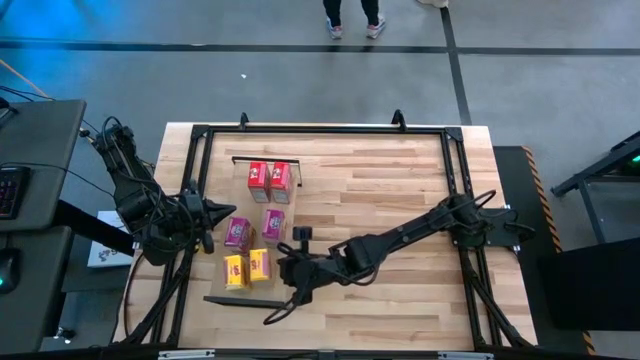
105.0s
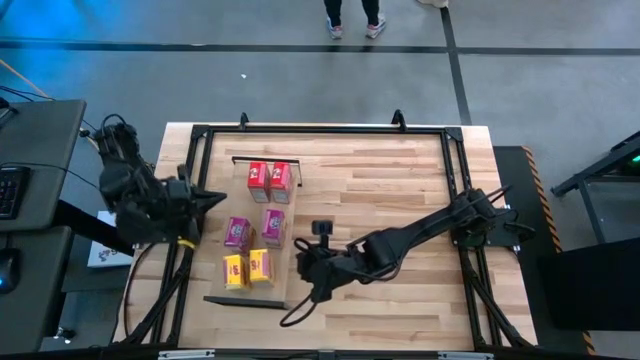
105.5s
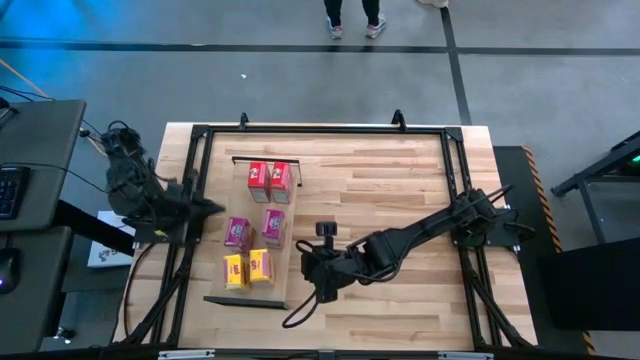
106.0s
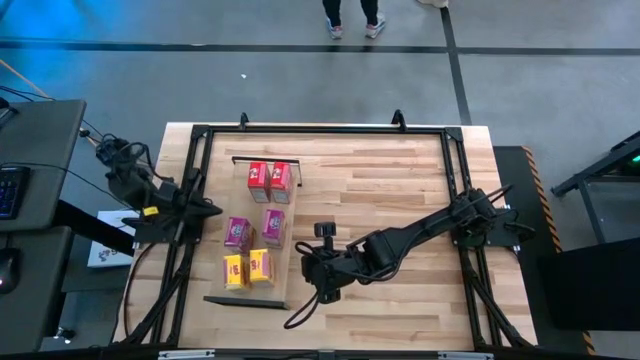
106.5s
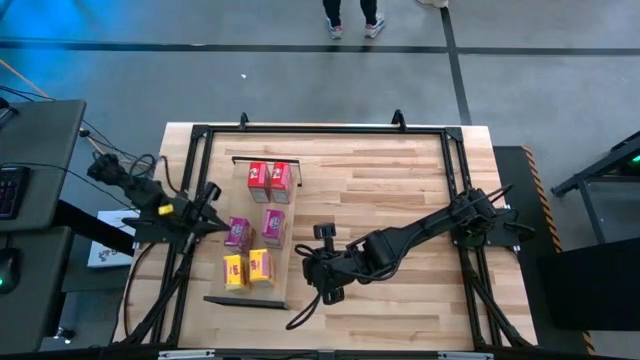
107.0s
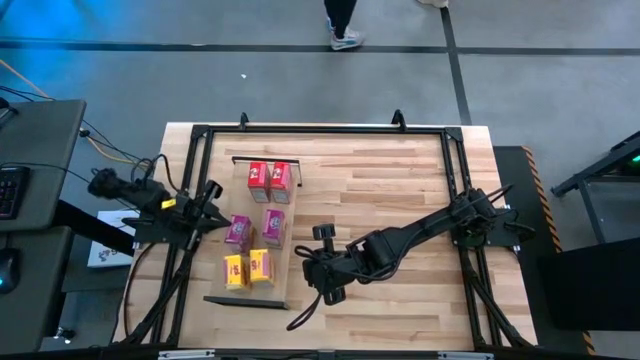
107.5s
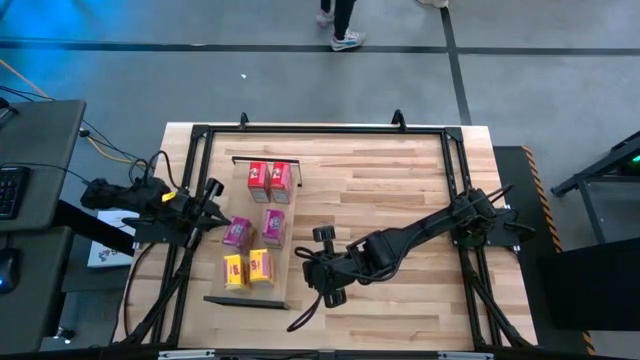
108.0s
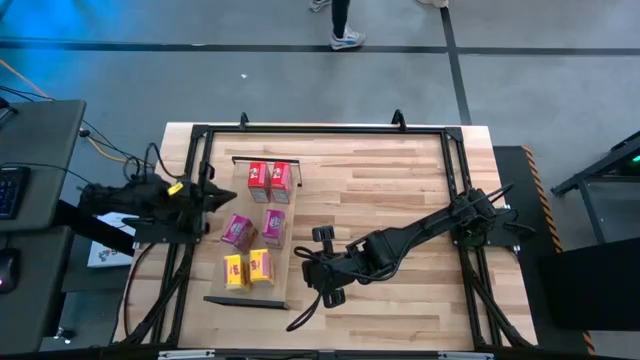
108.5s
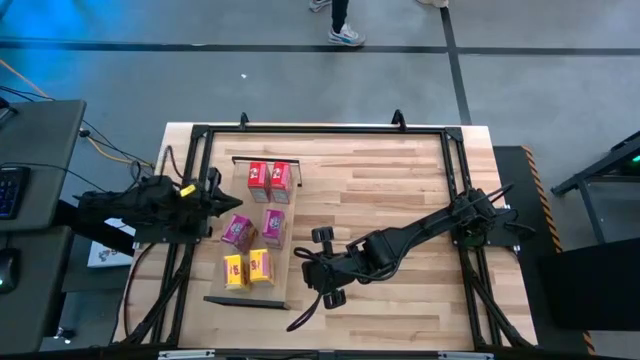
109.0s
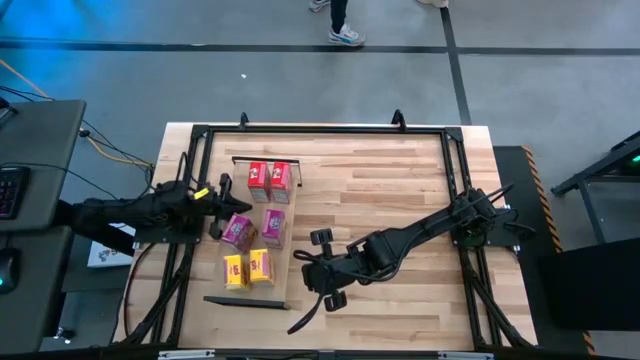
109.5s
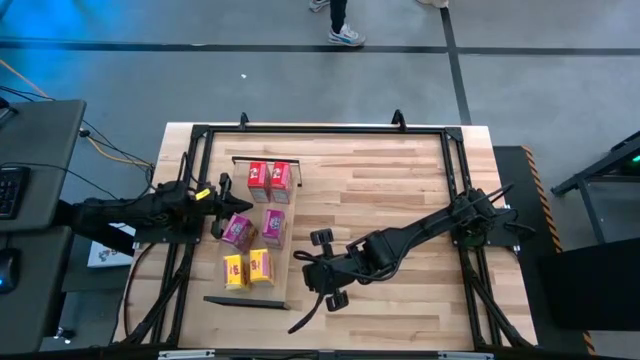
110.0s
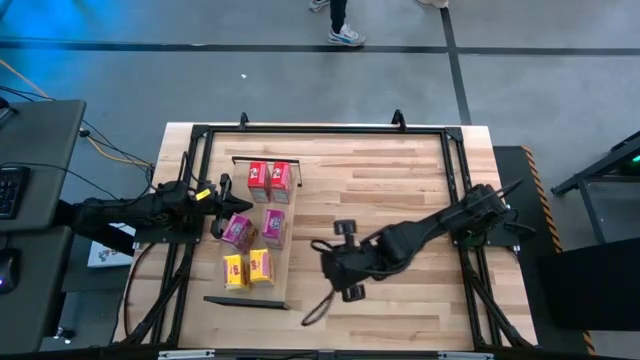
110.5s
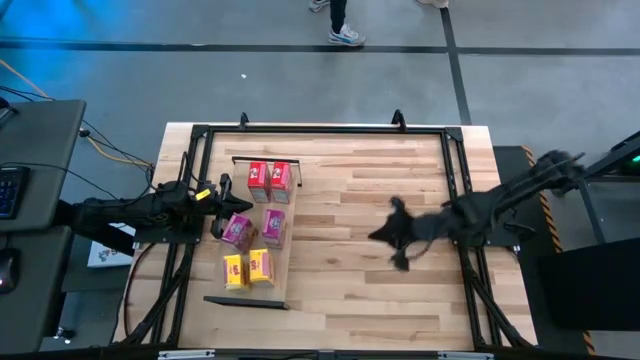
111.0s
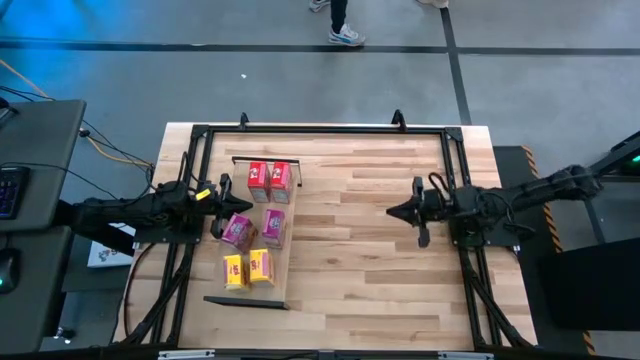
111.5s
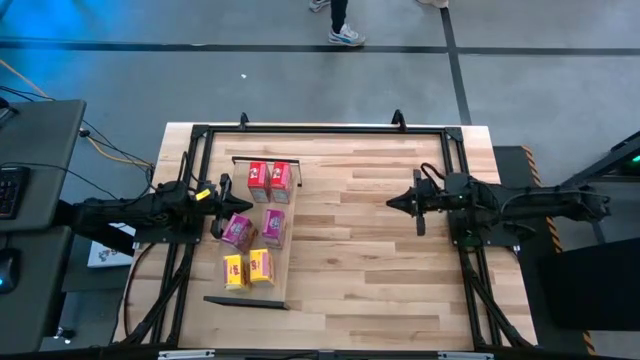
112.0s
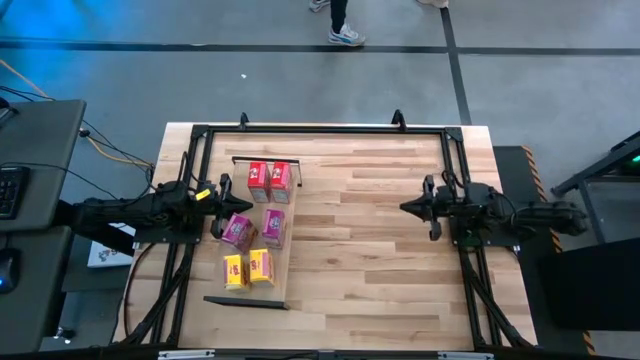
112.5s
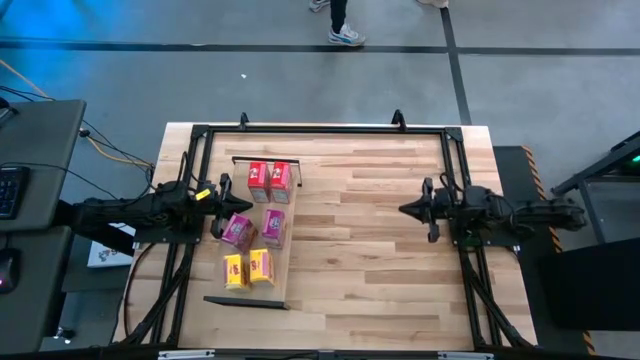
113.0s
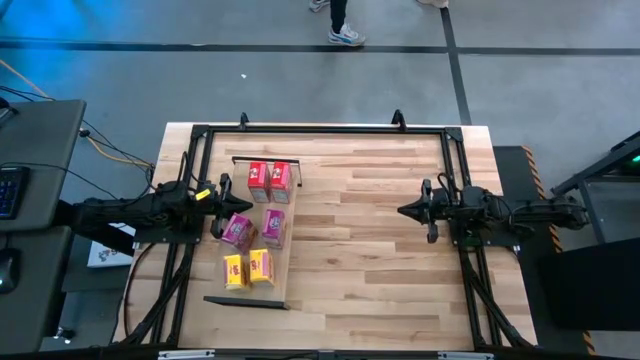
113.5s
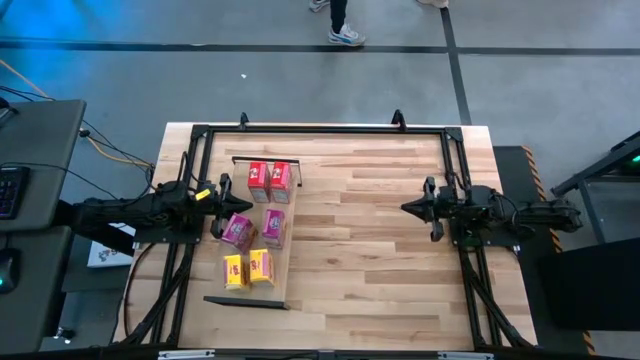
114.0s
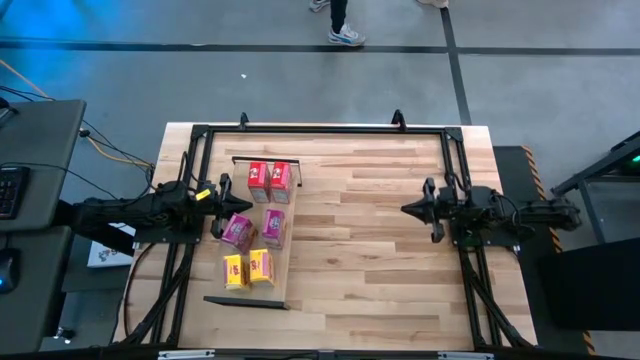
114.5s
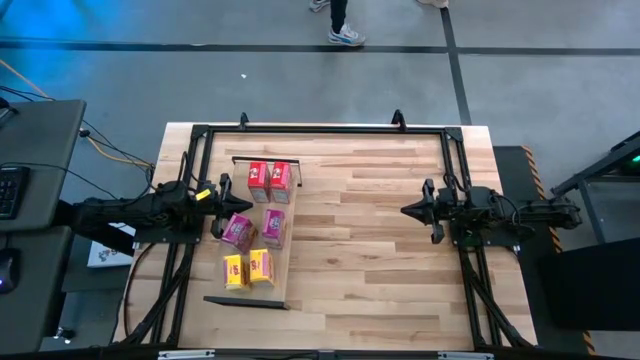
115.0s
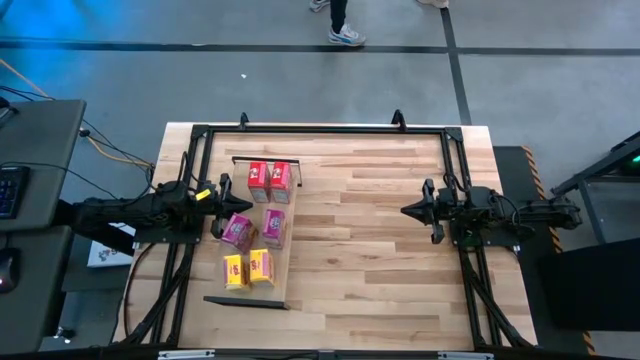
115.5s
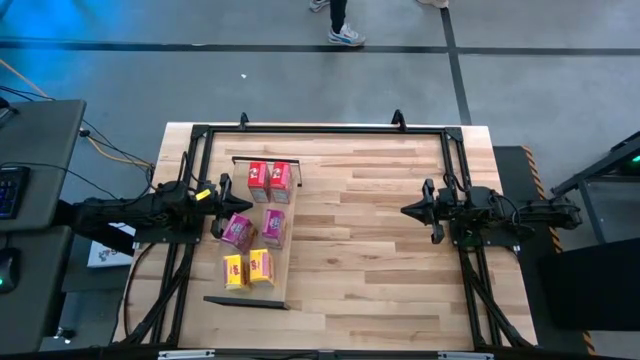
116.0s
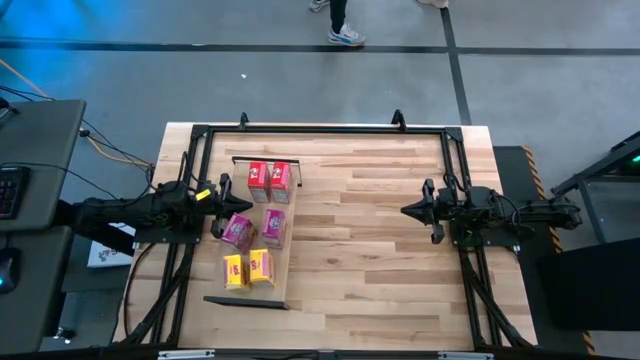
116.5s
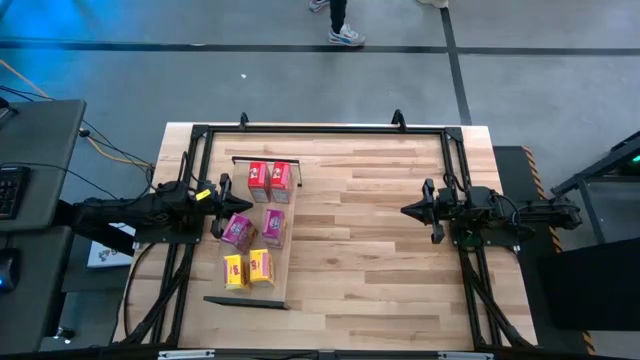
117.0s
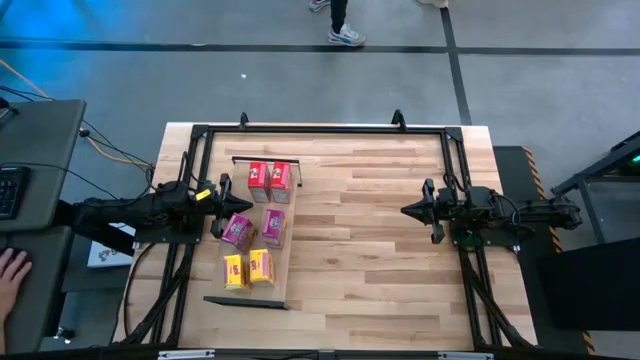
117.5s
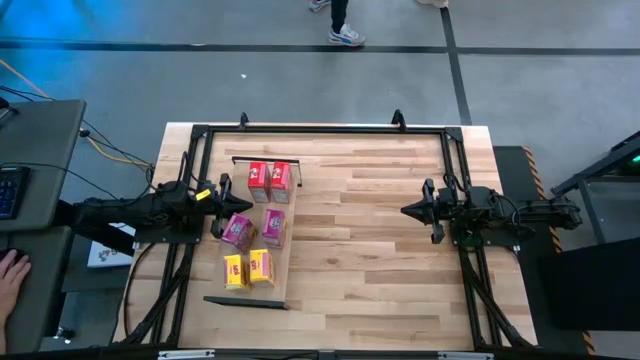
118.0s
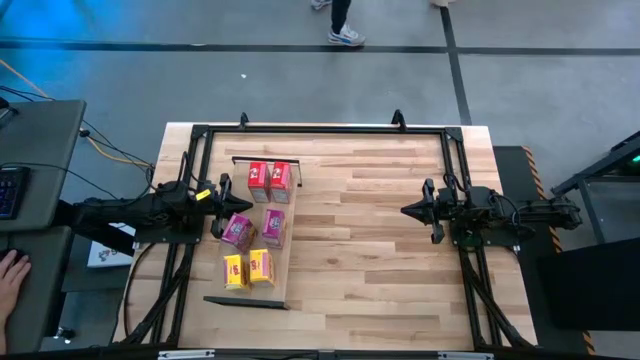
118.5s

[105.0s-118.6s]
Task: Stack cereal on shelf
Return to Home Position
